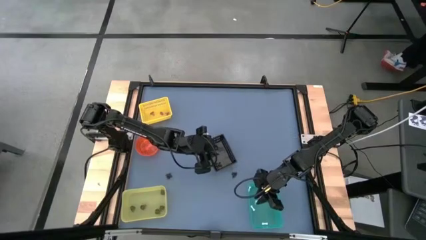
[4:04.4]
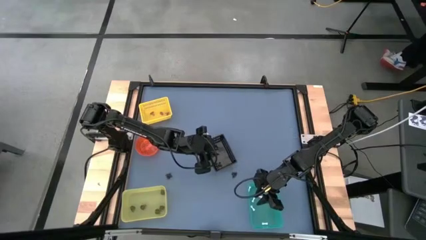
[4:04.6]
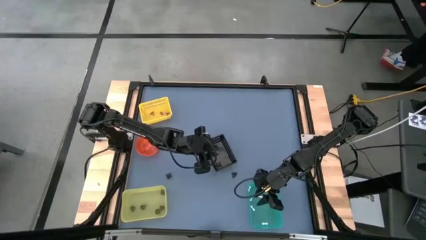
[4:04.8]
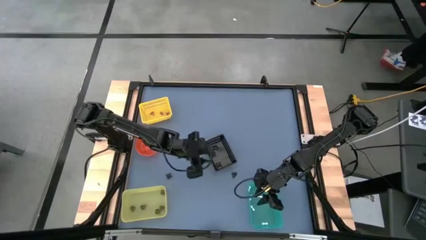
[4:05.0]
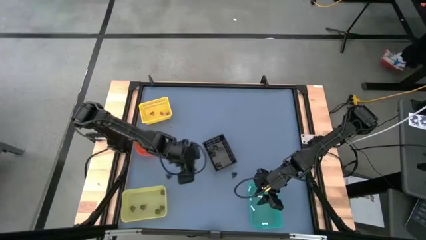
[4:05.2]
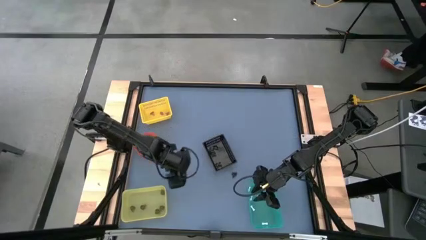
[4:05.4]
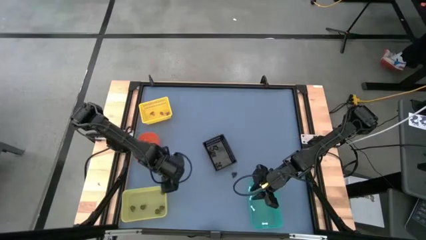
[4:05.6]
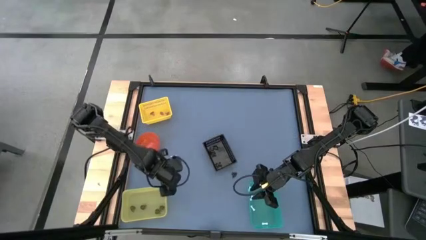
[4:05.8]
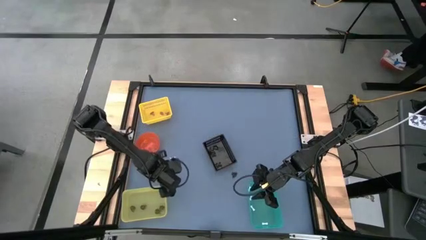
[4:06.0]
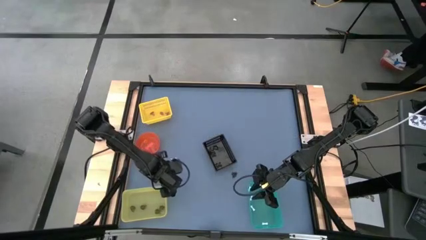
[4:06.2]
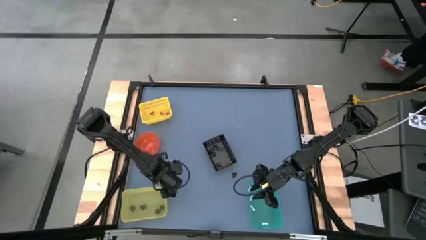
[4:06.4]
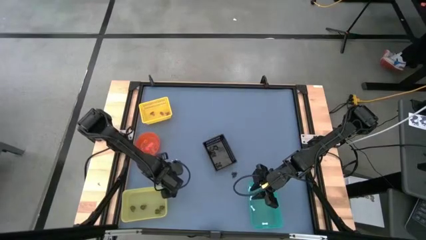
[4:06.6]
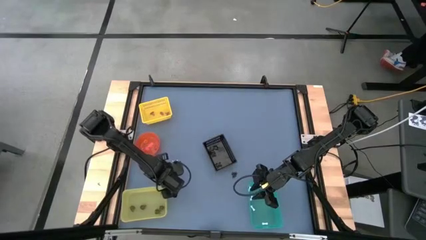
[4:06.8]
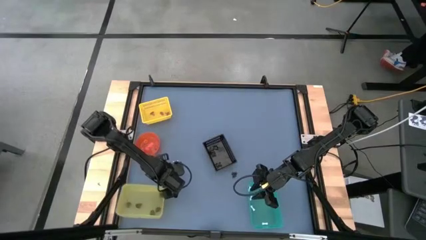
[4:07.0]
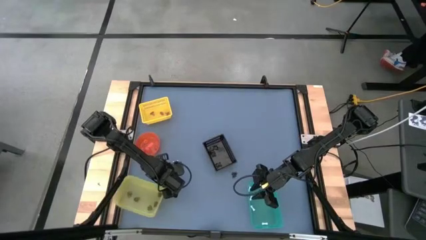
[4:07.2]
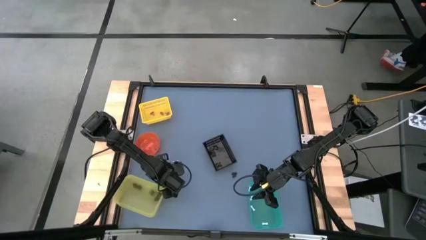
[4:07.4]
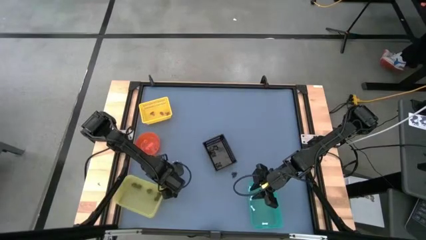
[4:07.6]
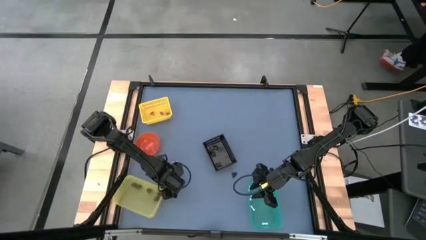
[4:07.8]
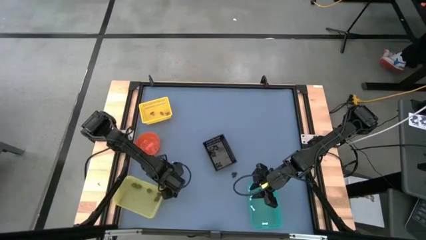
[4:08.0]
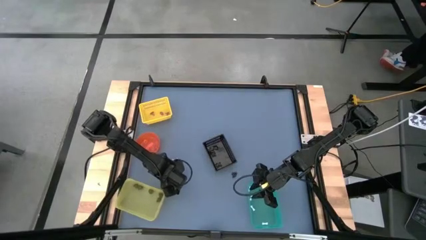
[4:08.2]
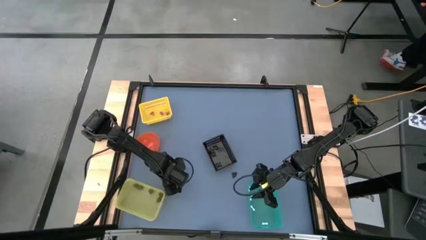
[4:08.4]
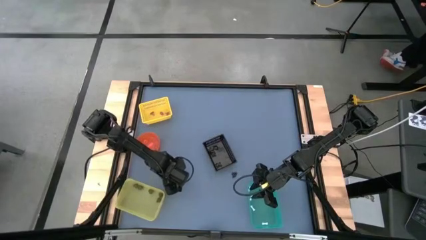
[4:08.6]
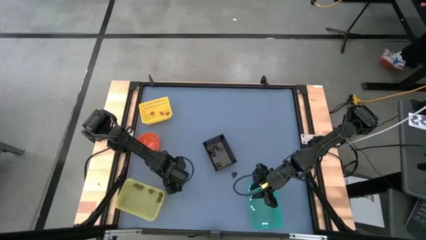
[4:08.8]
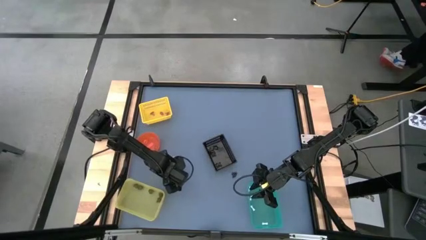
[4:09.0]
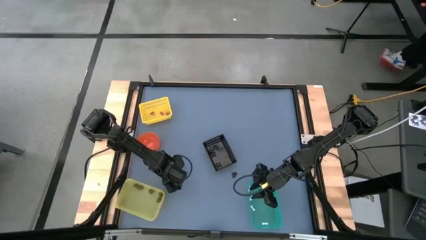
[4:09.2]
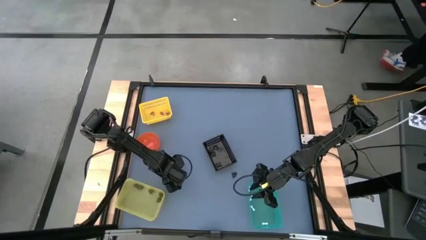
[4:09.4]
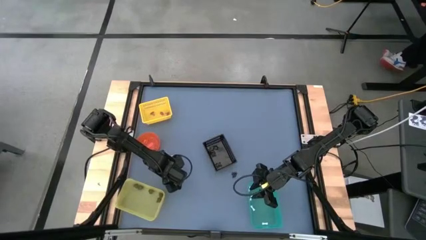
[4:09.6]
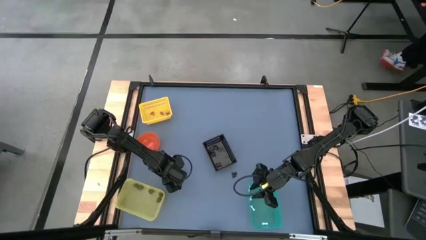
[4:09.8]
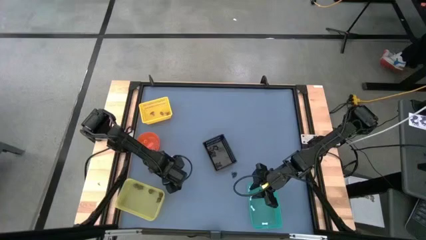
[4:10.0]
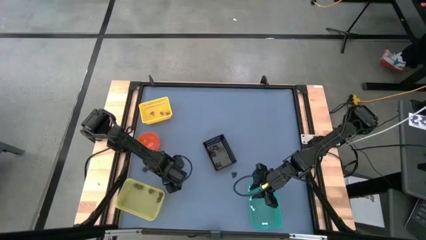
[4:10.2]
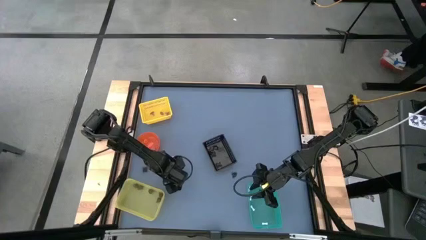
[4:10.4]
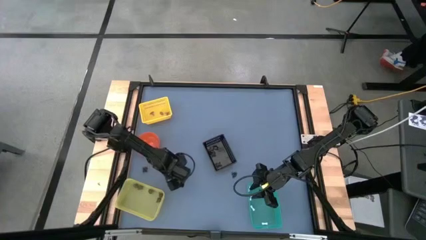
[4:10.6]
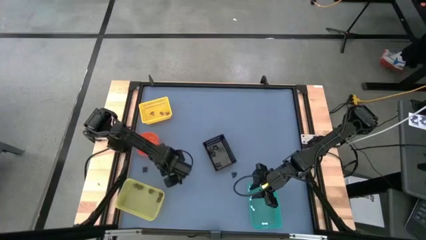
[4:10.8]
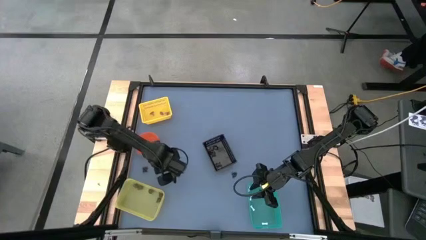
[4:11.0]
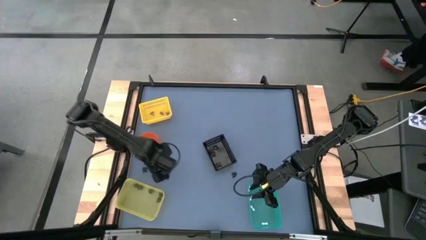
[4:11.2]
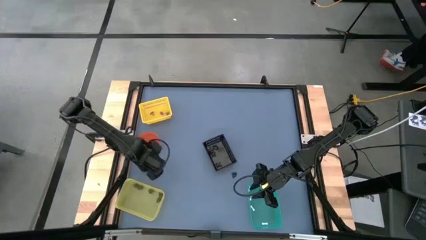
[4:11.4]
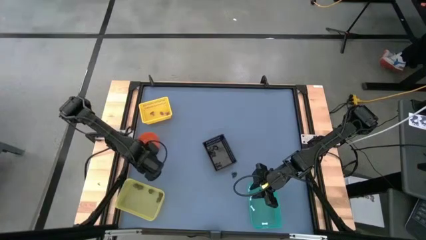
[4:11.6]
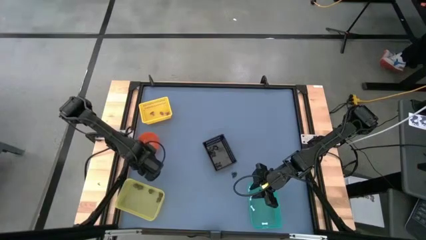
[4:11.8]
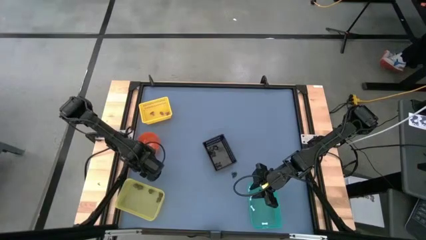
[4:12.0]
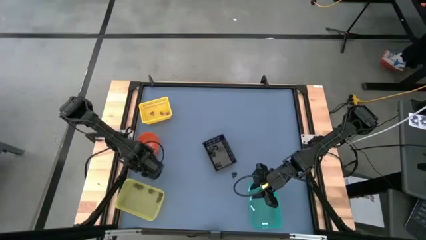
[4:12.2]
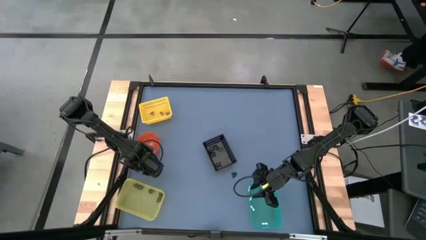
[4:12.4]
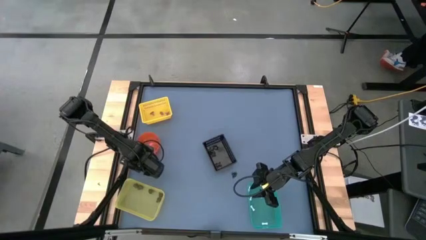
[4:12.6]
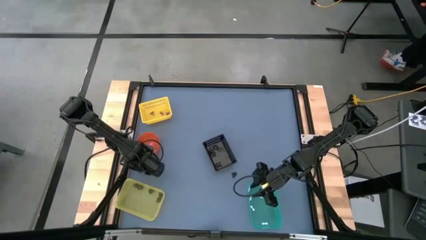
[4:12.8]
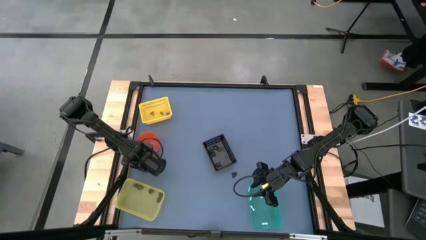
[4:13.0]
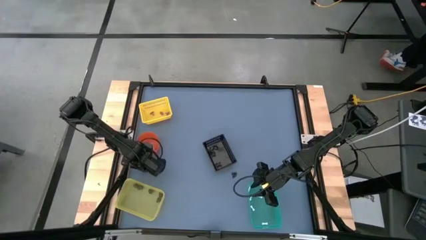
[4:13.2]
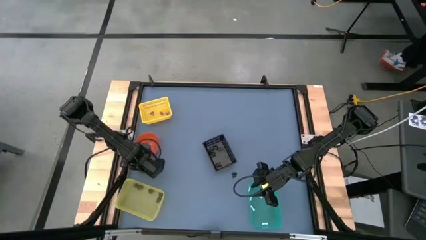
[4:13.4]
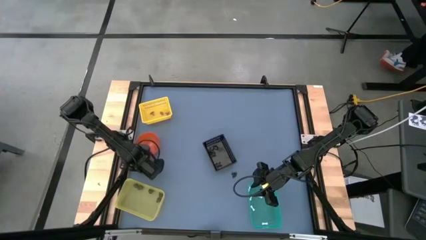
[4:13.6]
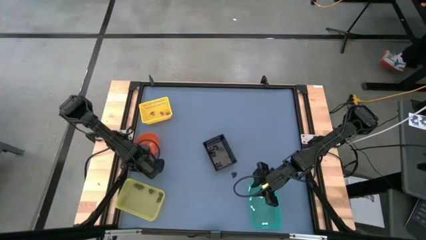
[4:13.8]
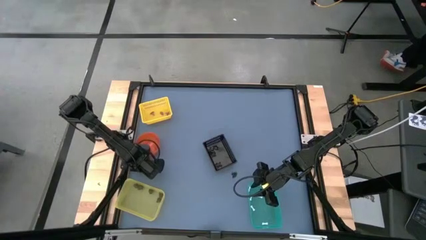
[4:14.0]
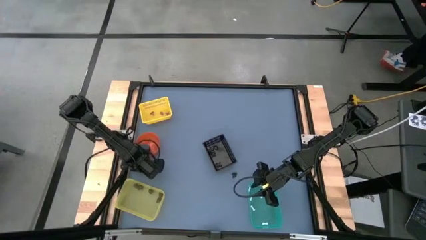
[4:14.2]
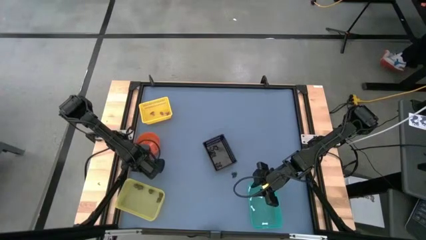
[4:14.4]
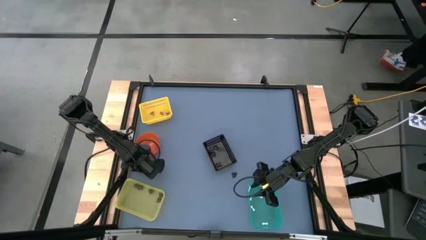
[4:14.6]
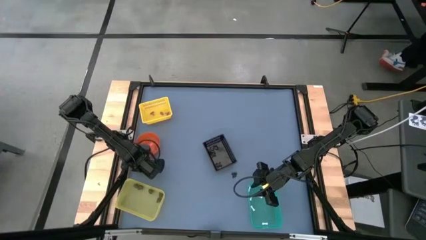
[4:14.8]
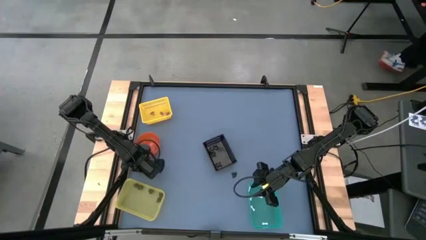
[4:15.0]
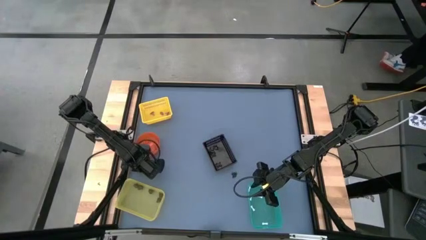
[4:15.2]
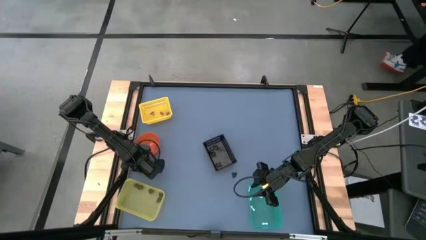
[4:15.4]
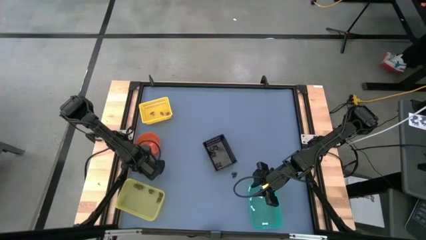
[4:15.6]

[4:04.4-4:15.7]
Task: Sort Halloween decoration
Put the black spider toy into the black bin

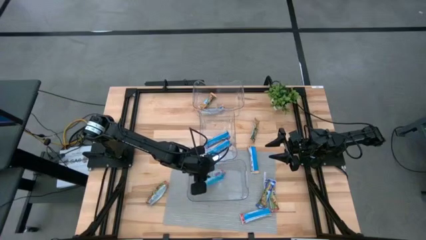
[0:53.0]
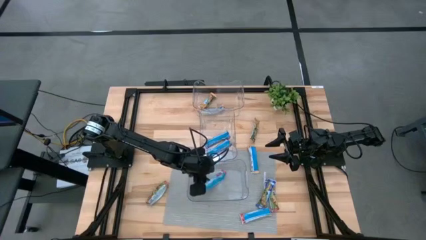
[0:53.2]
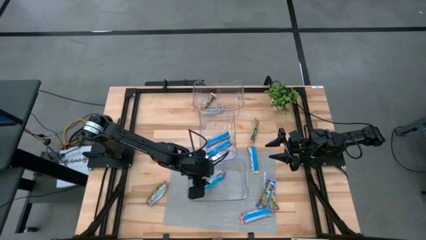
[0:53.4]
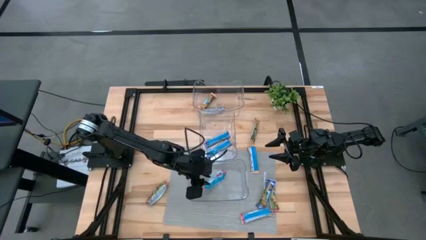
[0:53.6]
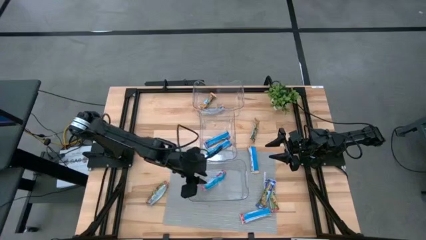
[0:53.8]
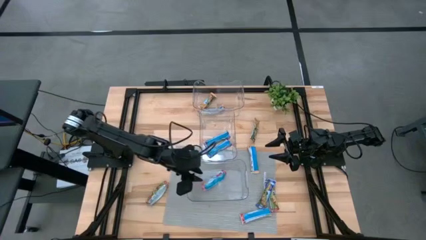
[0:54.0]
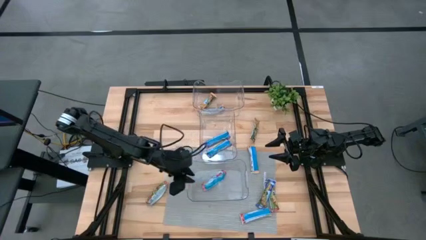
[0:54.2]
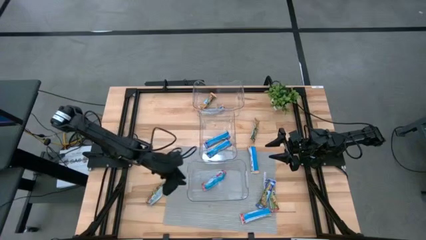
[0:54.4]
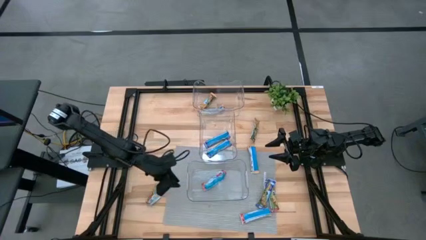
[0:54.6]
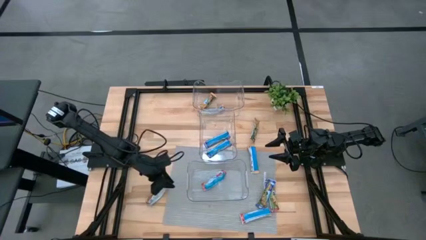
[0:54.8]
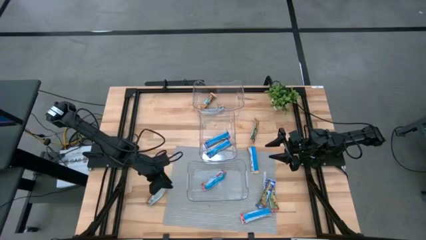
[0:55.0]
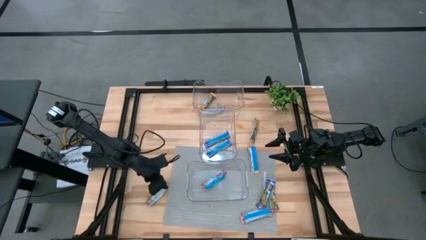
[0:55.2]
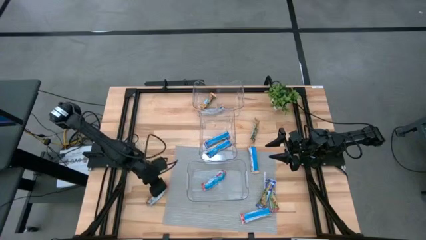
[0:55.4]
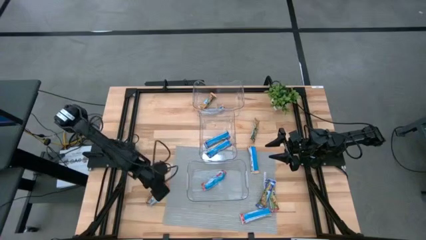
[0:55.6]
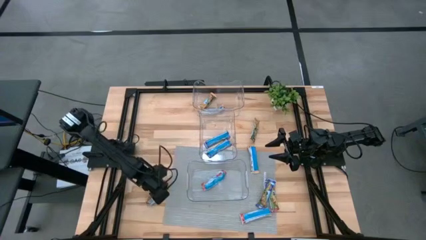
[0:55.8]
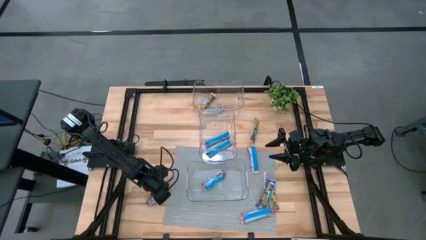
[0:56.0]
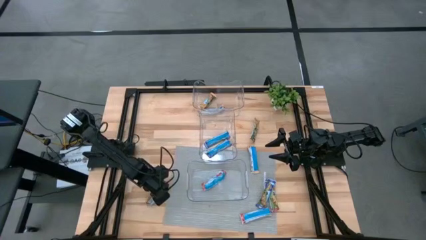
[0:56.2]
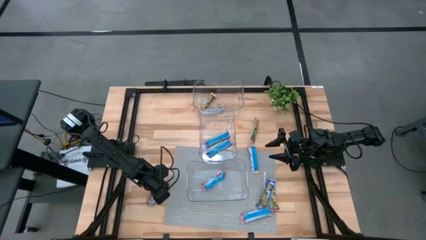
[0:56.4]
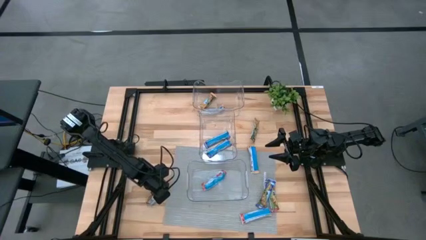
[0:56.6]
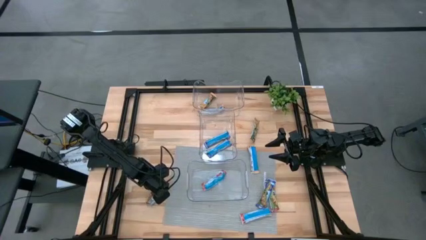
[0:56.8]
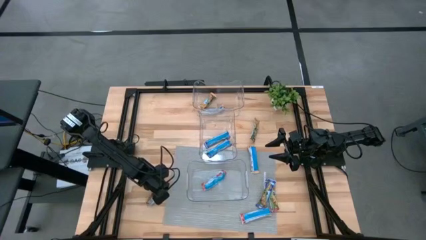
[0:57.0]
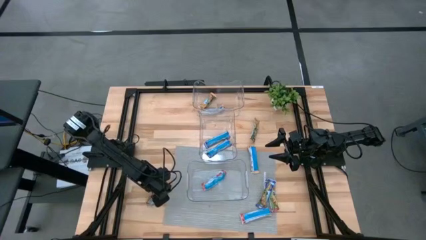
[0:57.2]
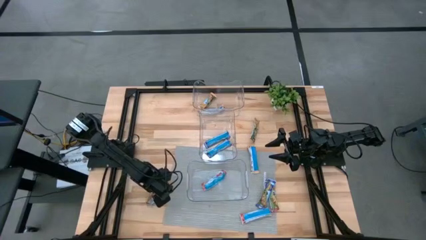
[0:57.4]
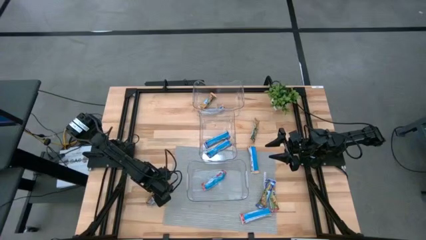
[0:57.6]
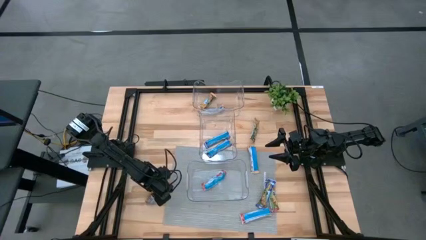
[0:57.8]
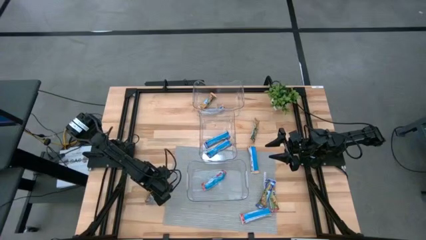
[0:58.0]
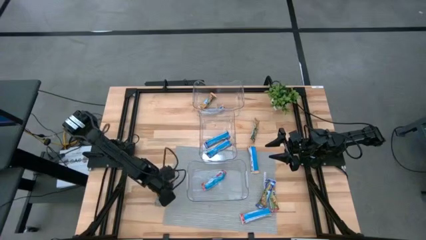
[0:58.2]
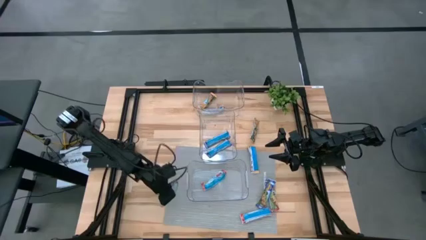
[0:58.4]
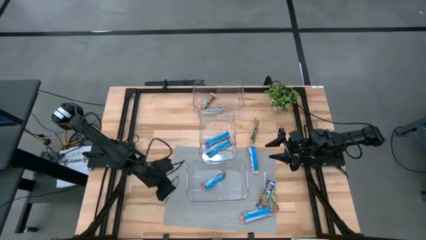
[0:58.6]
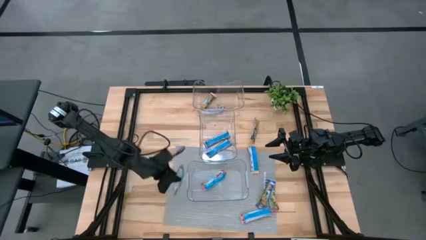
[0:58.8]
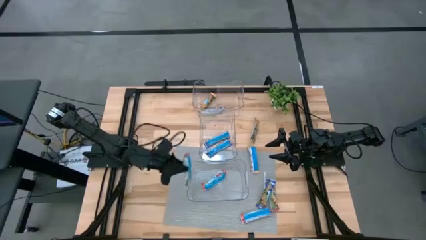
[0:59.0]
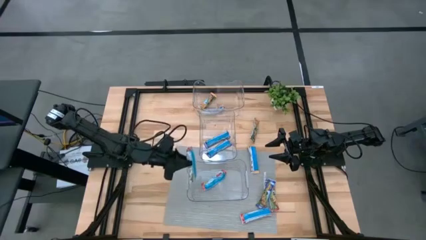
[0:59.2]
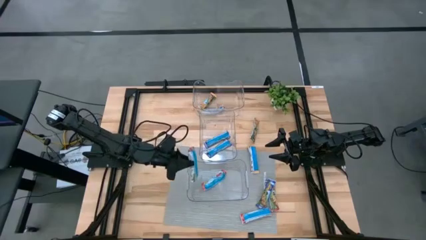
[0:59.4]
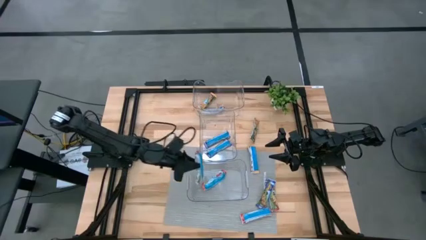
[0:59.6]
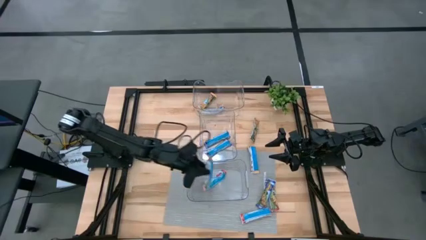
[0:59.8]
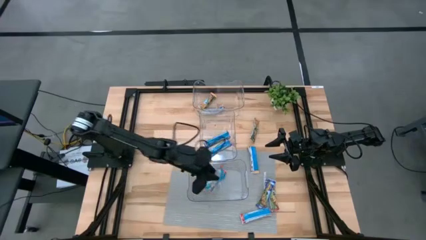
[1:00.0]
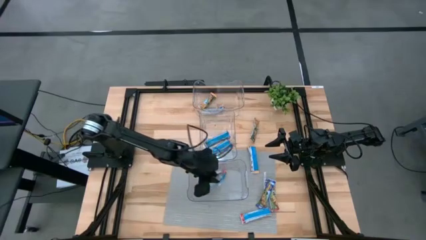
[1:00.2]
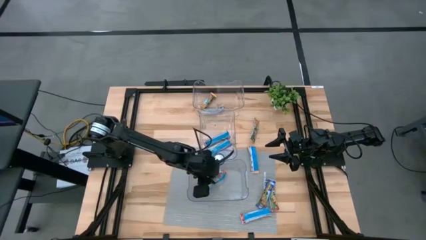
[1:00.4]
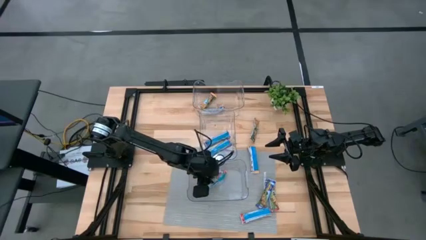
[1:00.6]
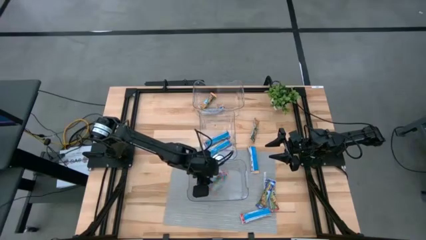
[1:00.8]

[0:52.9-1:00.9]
Task: Pick and place Granola Bars by type
Put the red granola bar into the bottom transparent bin
